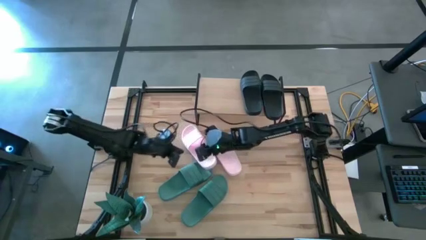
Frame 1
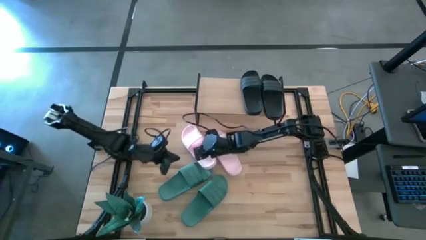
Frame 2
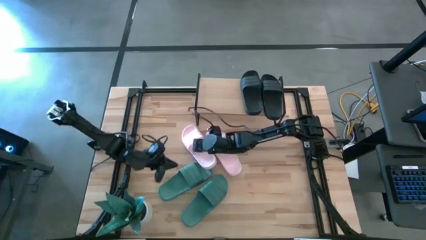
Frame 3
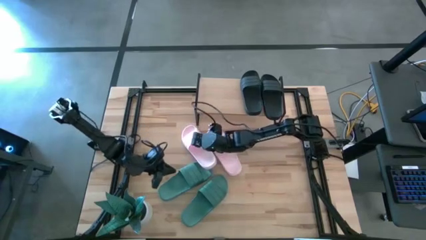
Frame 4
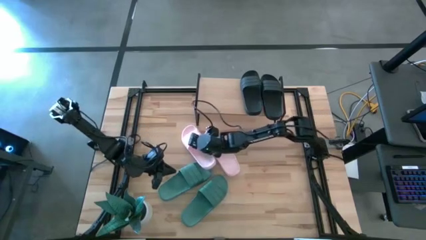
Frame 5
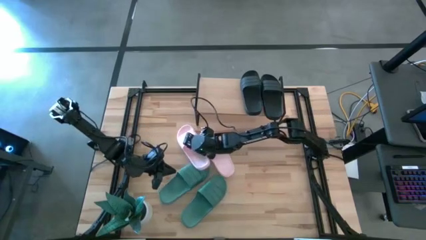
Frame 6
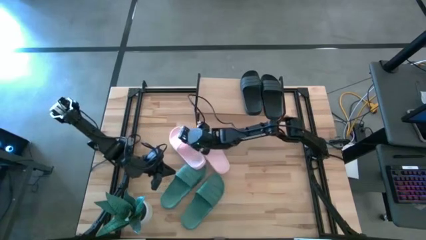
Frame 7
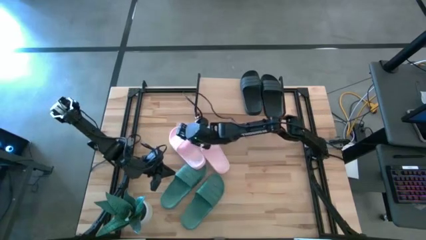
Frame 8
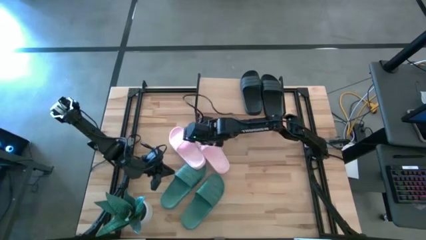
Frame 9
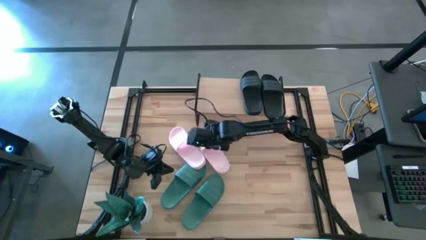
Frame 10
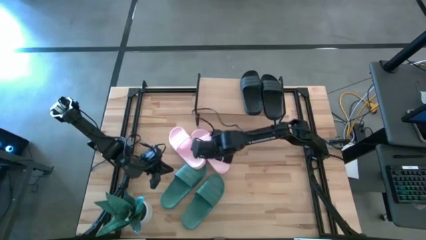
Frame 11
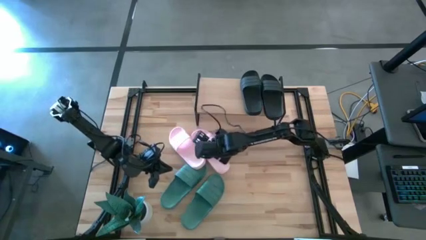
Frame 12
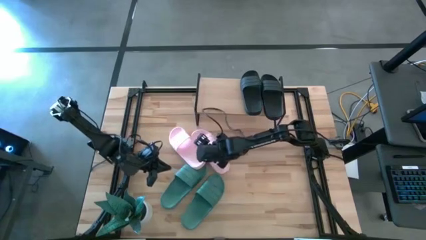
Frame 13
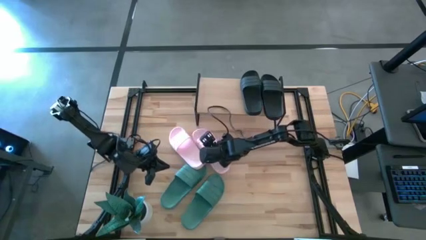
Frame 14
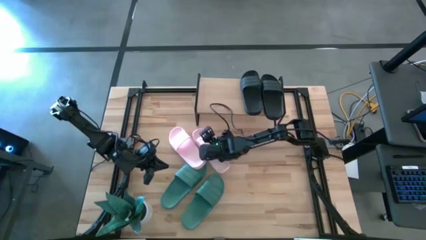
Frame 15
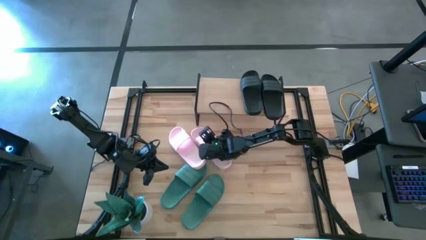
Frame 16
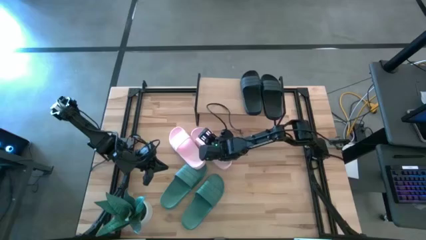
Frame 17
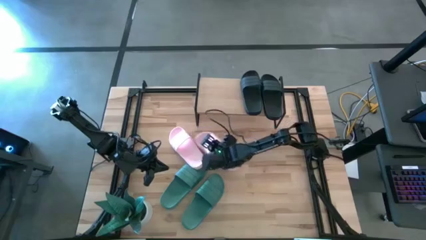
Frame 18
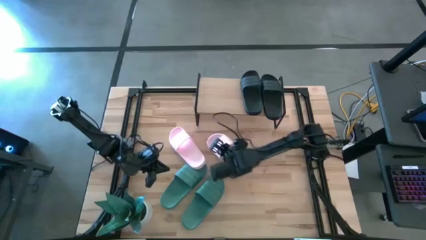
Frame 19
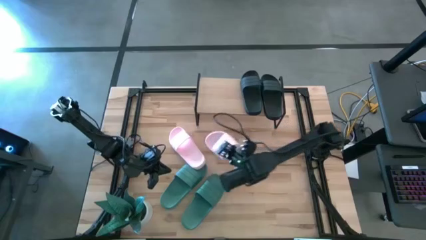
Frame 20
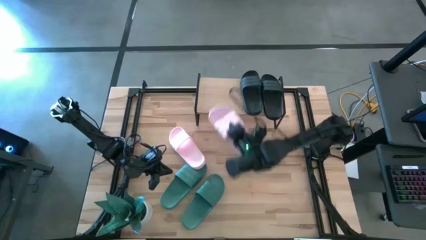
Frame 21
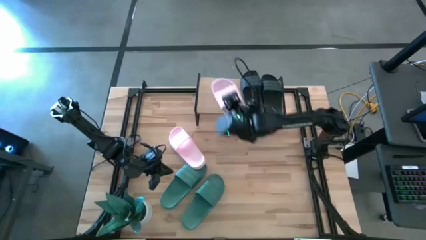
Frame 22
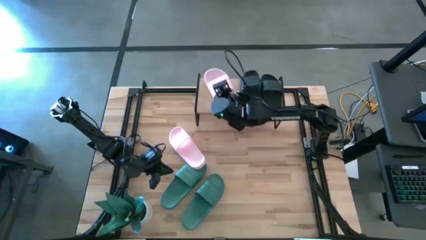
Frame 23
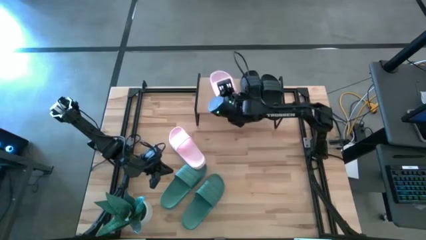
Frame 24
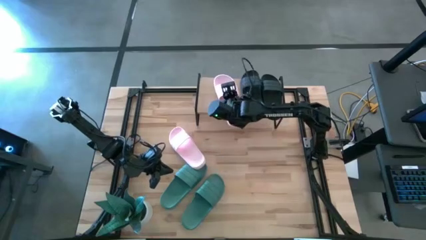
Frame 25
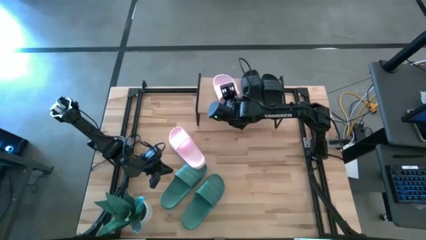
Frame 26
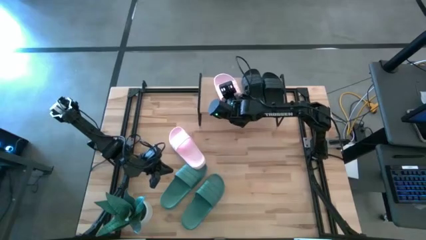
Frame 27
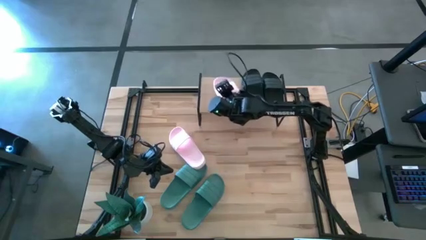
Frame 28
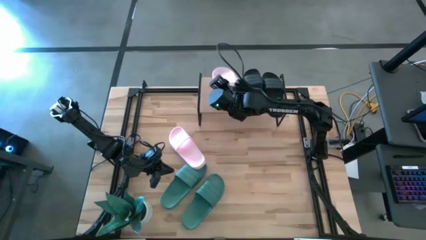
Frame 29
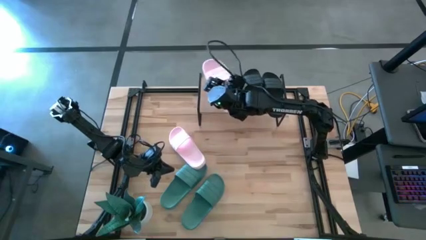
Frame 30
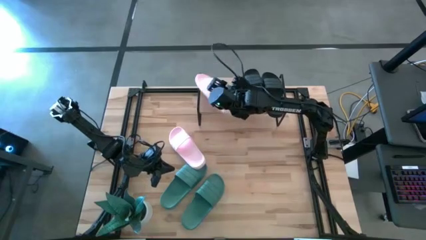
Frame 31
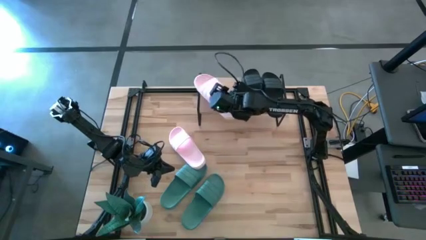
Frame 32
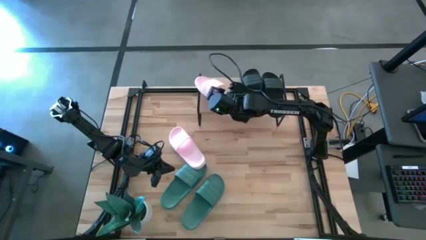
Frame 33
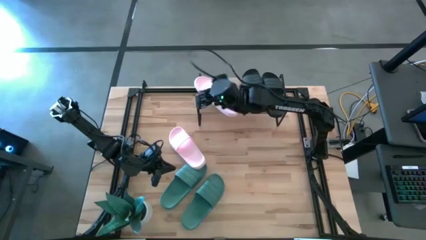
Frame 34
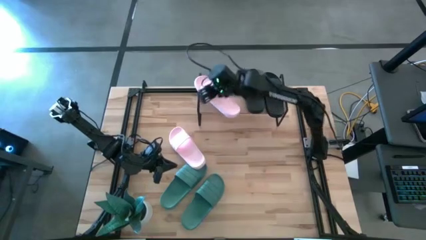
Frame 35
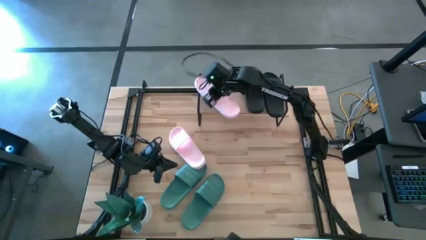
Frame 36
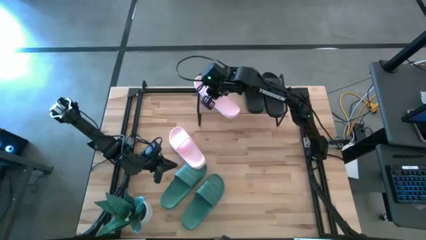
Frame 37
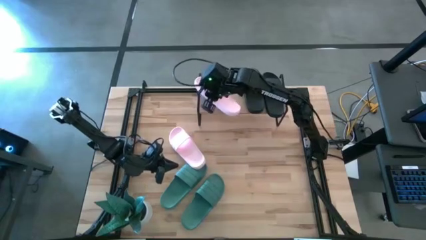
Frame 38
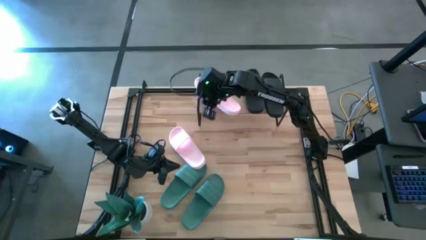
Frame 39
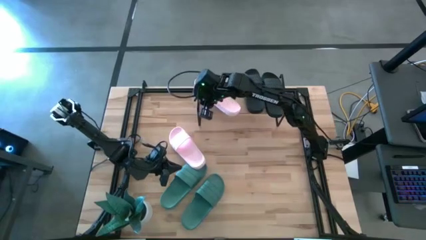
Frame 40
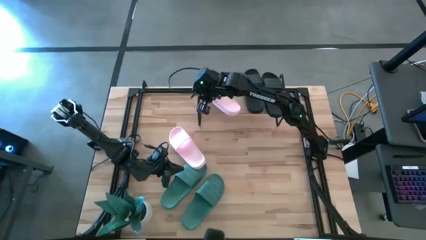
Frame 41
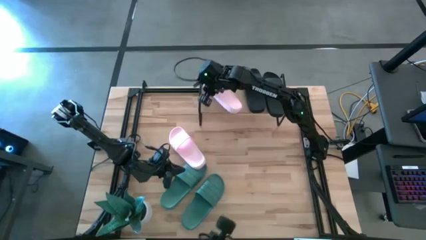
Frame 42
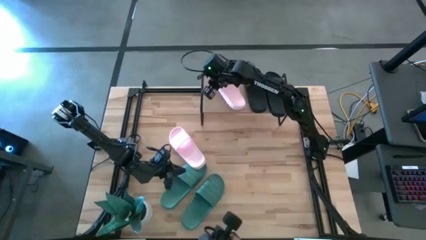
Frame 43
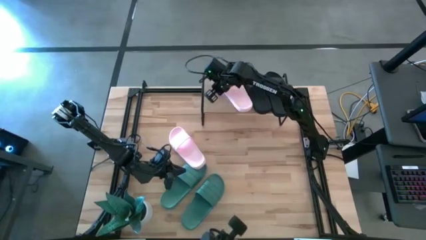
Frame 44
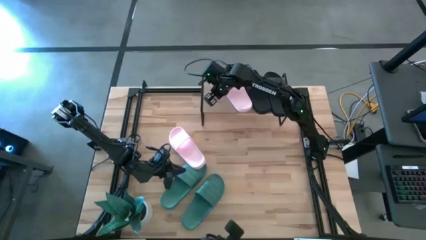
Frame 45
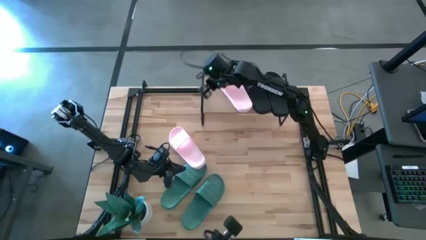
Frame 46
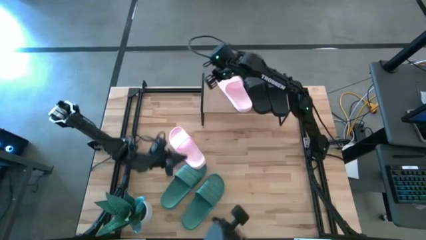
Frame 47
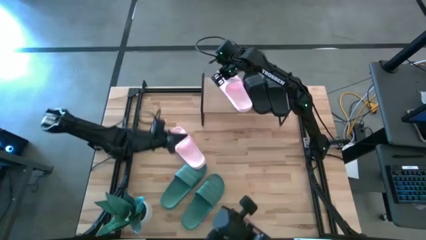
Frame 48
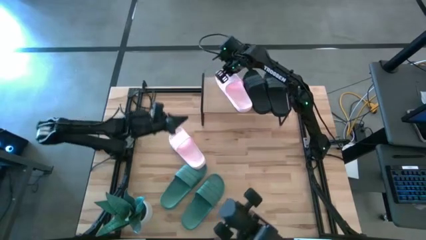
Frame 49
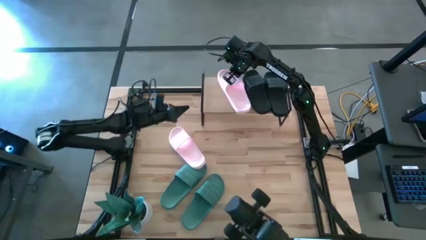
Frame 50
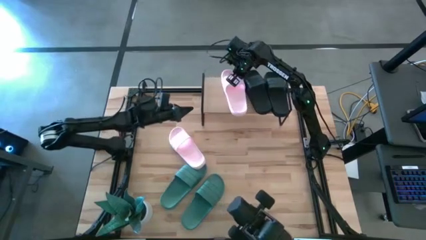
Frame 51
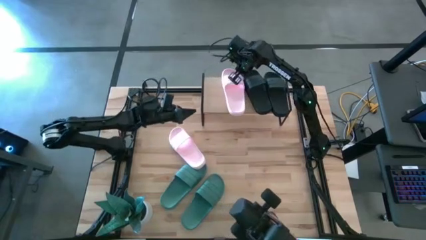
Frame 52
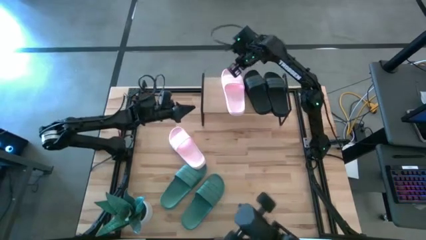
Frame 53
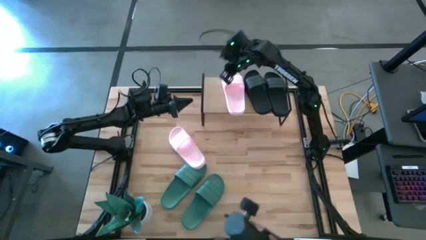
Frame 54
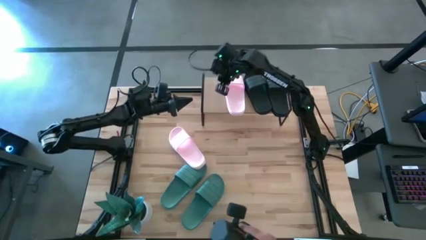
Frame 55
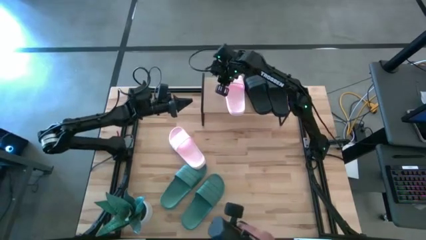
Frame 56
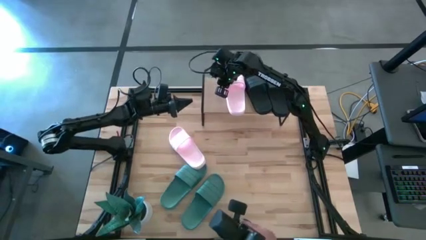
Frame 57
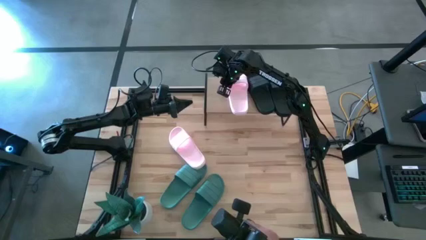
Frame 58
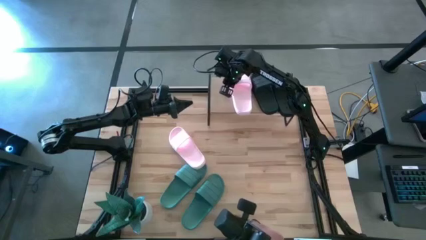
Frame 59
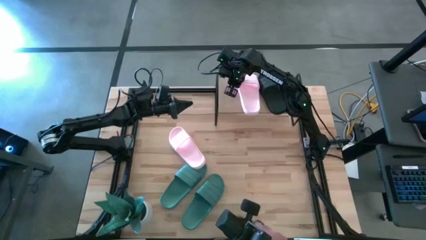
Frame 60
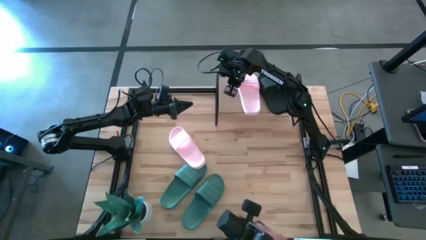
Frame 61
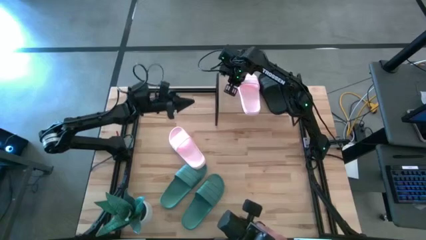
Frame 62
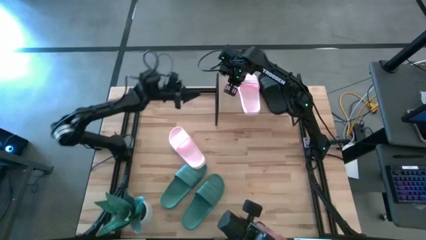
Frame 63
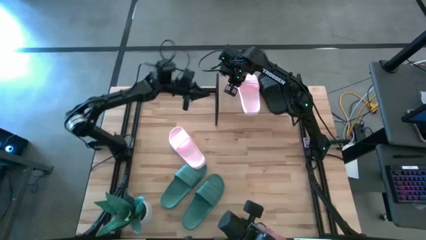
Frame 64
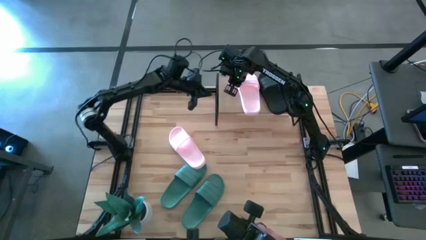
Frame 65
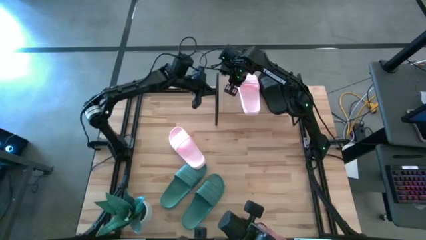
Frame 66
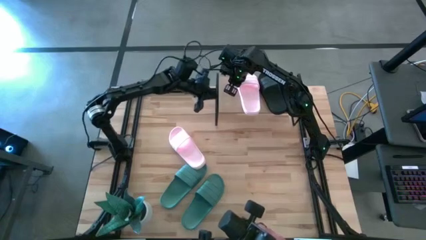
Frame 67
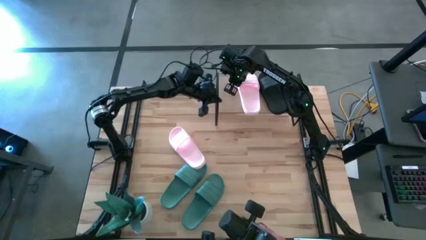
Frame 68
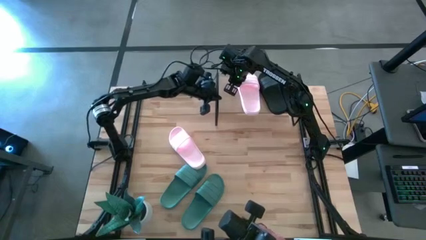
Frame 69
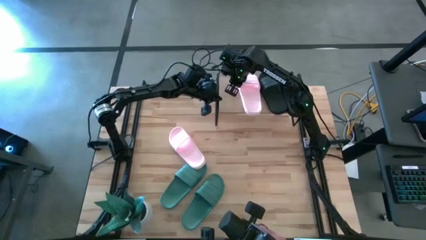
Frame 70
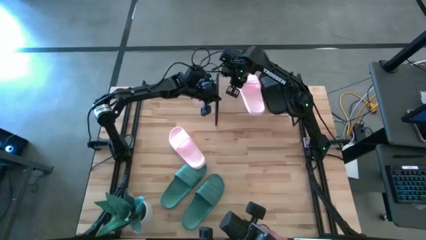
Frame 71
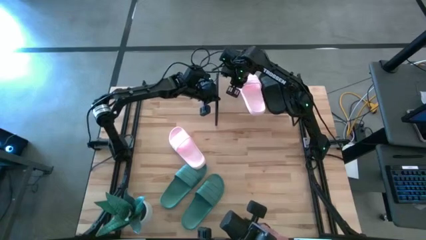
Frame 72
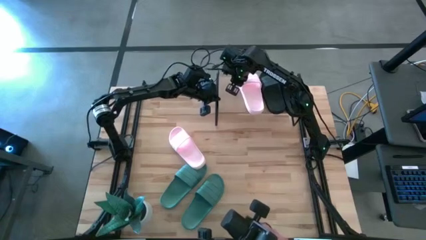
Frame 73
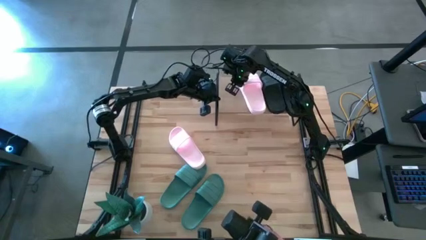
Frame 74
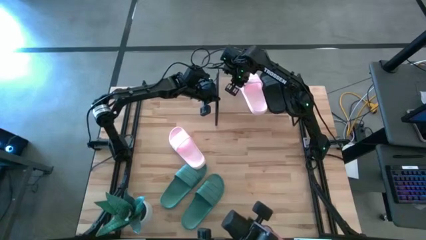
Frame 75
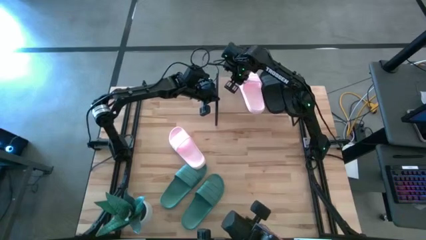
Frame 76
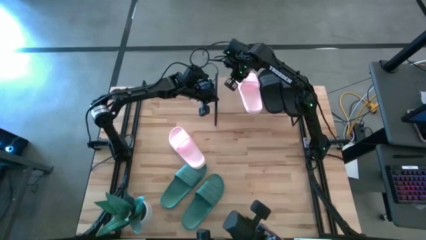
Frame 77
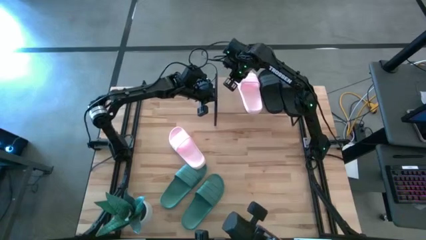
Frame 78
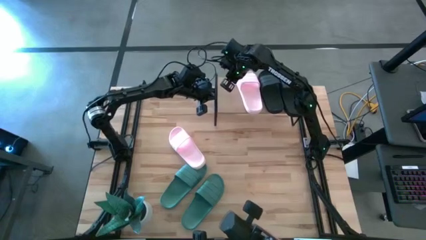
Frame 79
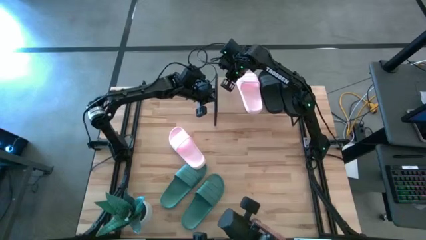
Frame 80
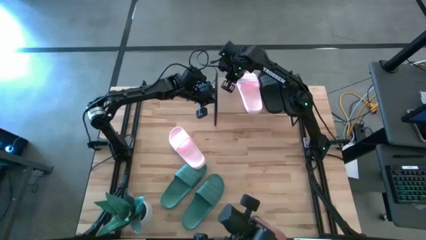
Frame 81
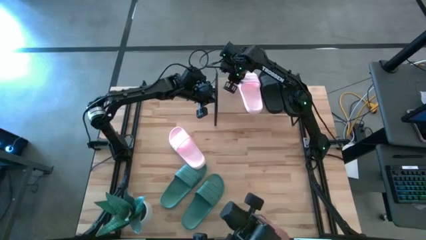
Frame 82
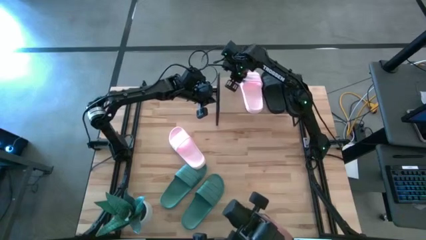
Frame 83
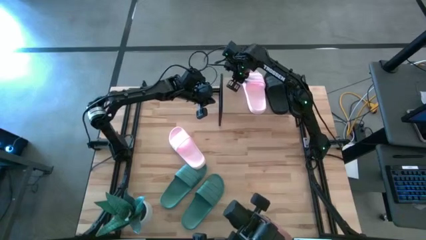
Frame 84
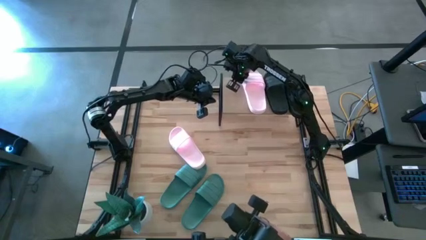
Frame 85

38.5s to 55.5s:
Task: Pick and place slides into the shelf
Put the right pink slipper onto the shelf
